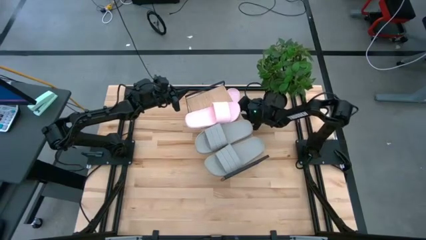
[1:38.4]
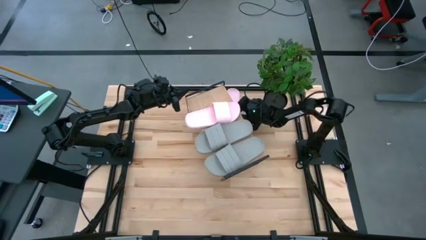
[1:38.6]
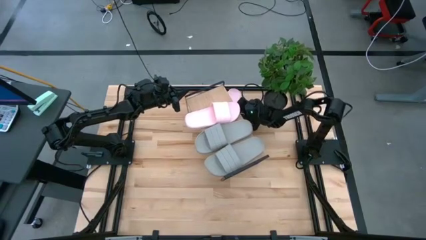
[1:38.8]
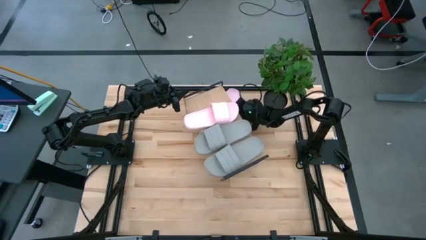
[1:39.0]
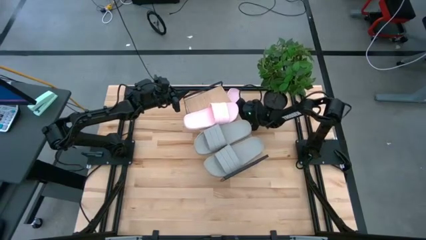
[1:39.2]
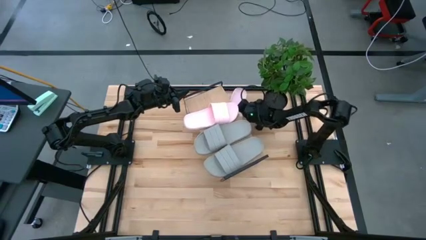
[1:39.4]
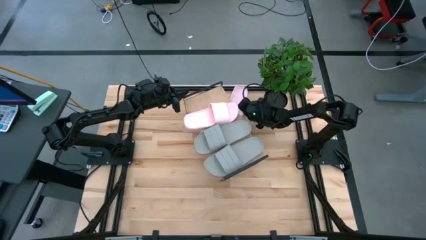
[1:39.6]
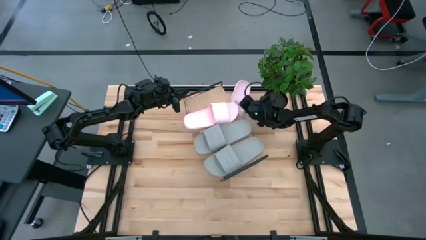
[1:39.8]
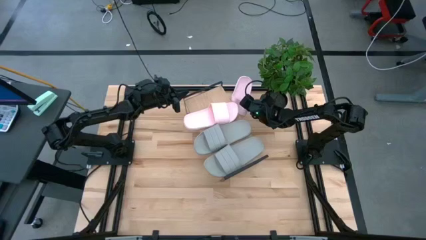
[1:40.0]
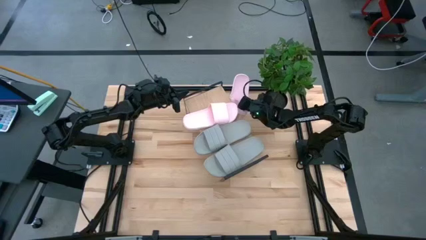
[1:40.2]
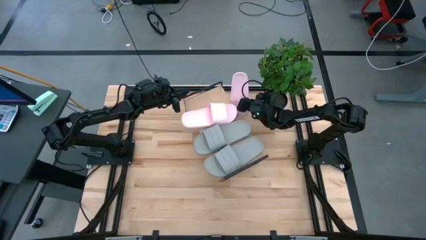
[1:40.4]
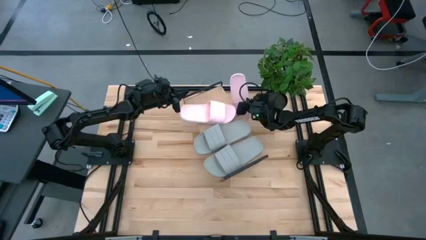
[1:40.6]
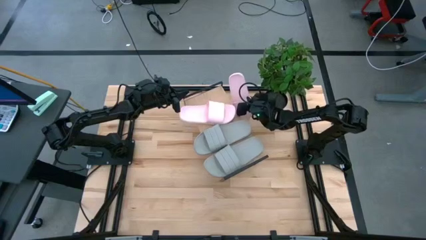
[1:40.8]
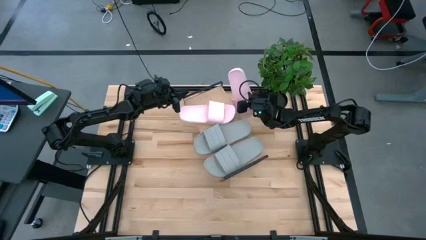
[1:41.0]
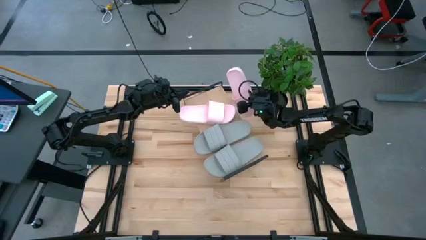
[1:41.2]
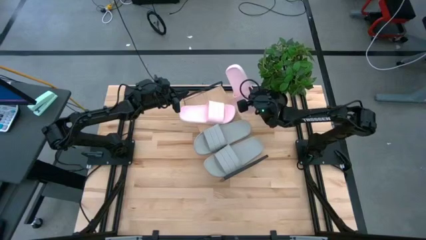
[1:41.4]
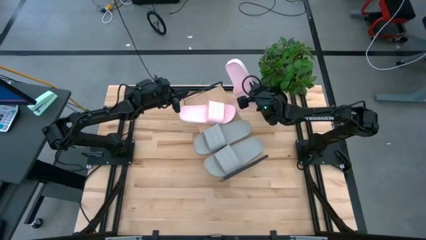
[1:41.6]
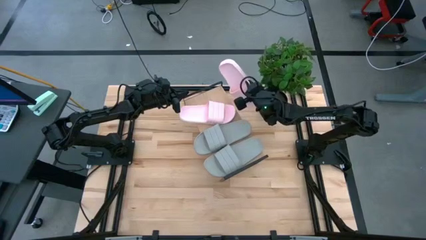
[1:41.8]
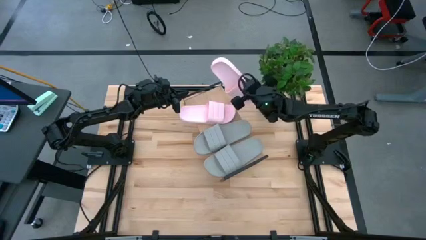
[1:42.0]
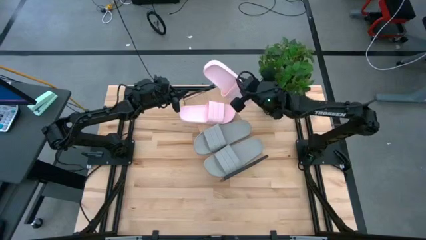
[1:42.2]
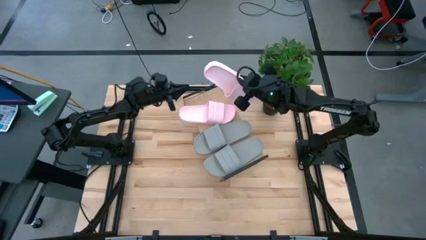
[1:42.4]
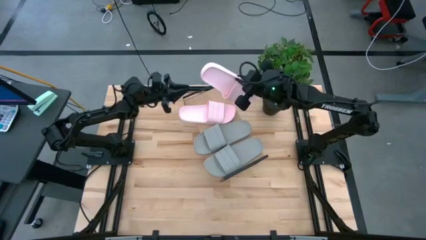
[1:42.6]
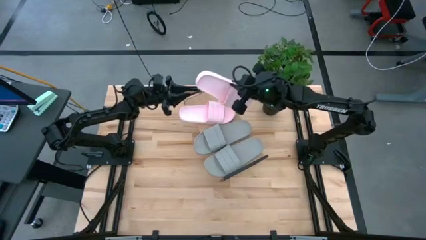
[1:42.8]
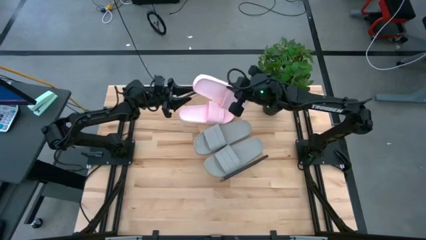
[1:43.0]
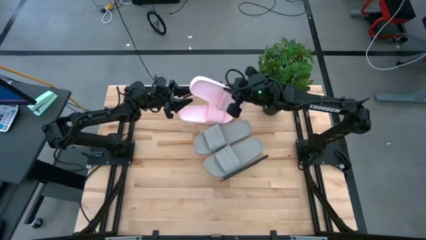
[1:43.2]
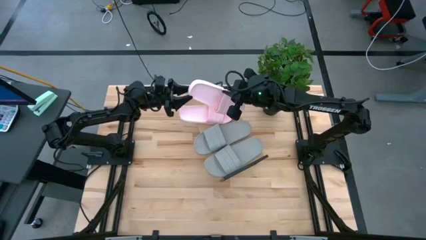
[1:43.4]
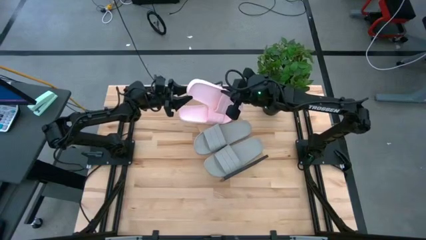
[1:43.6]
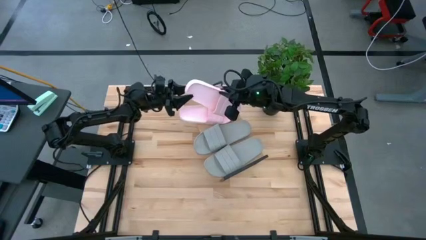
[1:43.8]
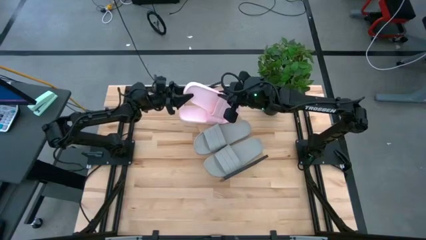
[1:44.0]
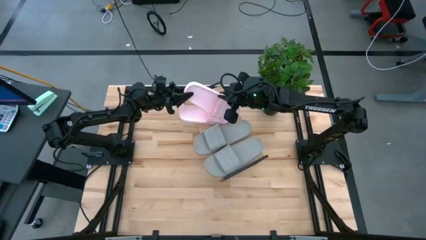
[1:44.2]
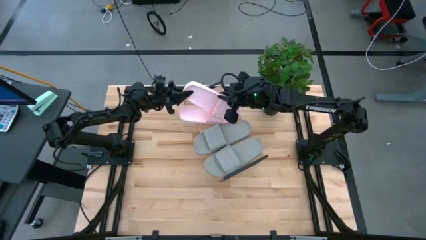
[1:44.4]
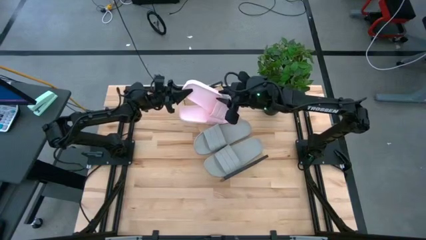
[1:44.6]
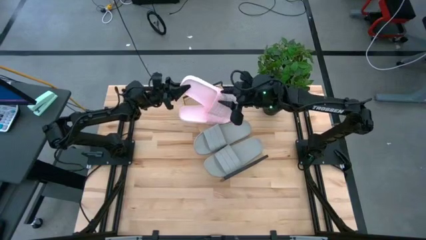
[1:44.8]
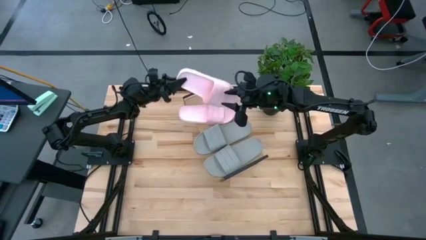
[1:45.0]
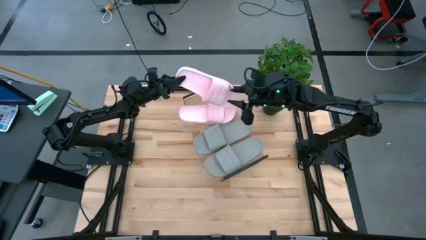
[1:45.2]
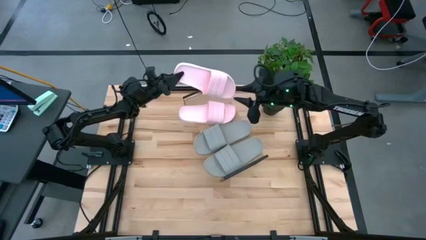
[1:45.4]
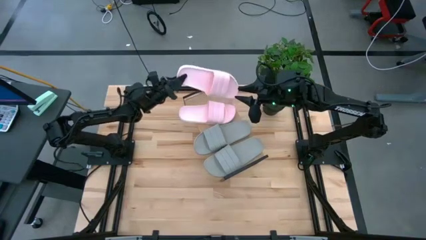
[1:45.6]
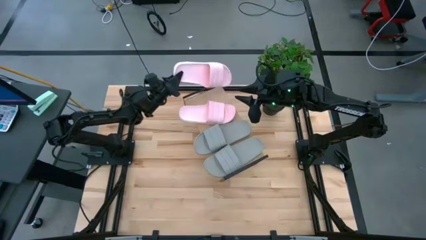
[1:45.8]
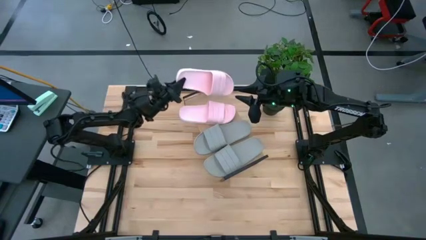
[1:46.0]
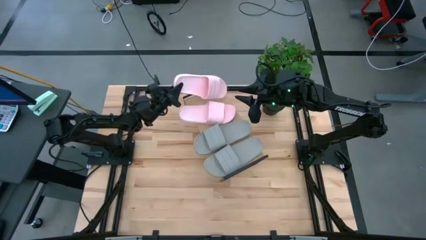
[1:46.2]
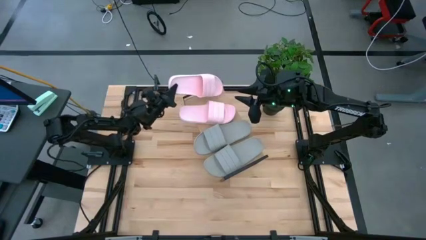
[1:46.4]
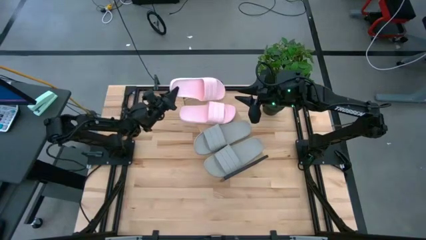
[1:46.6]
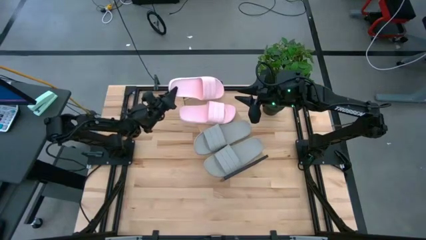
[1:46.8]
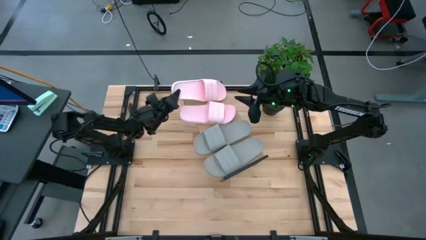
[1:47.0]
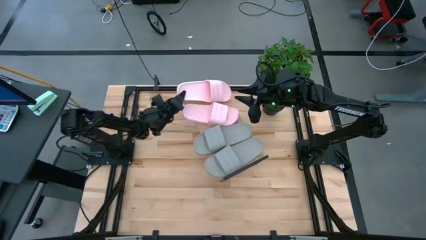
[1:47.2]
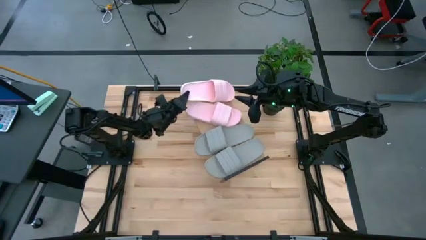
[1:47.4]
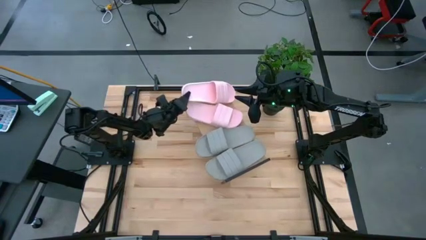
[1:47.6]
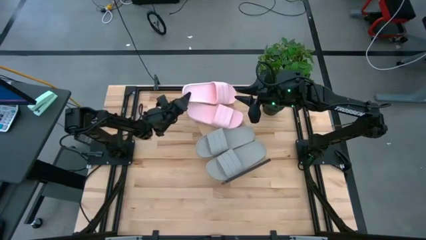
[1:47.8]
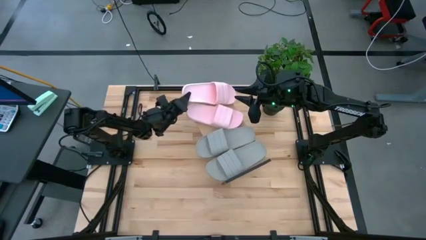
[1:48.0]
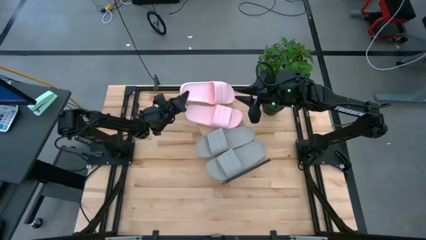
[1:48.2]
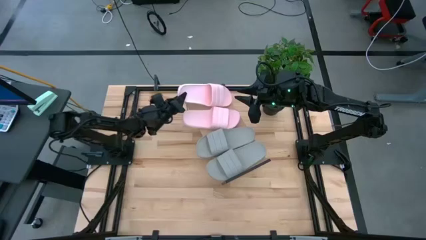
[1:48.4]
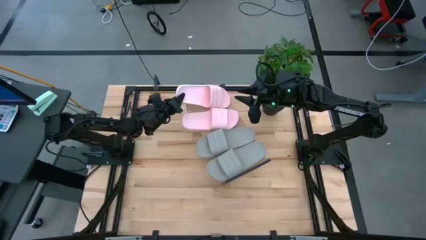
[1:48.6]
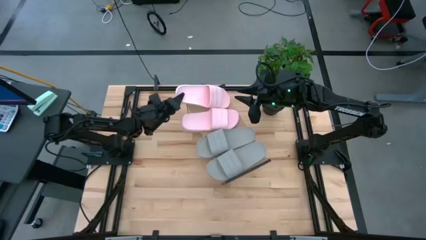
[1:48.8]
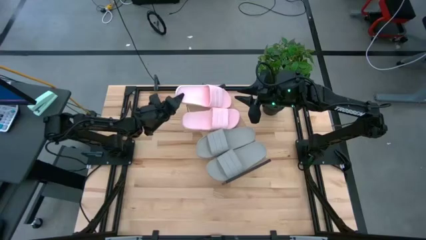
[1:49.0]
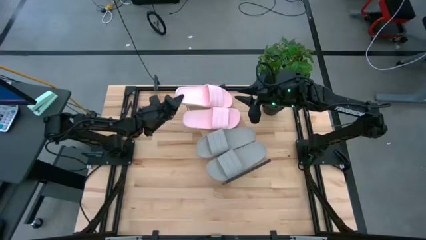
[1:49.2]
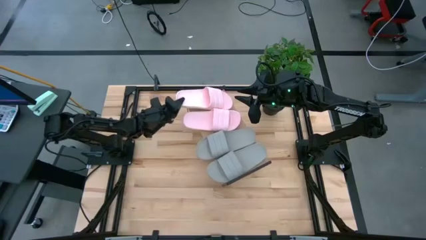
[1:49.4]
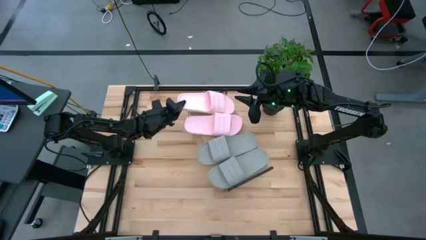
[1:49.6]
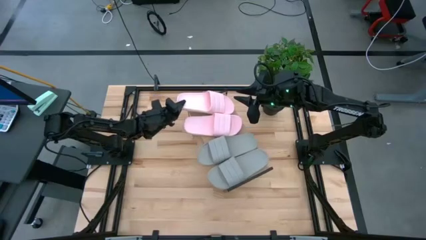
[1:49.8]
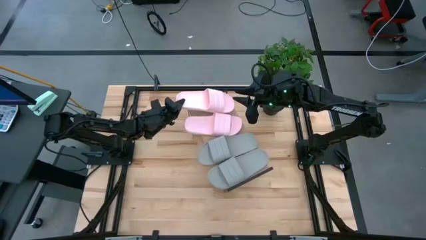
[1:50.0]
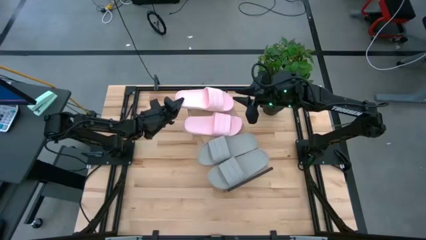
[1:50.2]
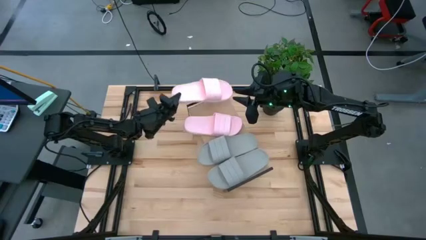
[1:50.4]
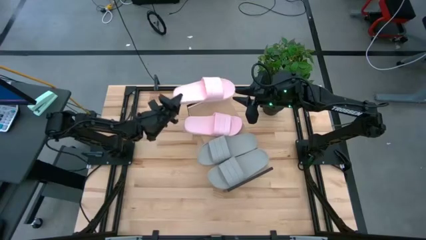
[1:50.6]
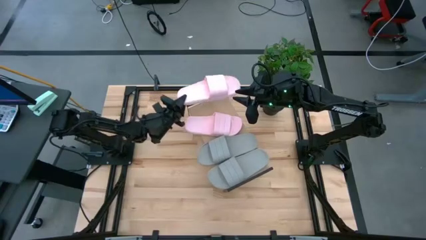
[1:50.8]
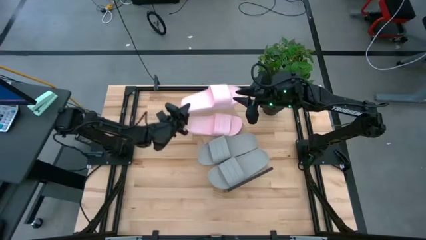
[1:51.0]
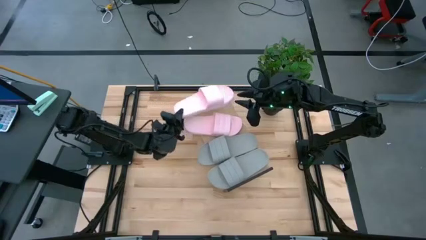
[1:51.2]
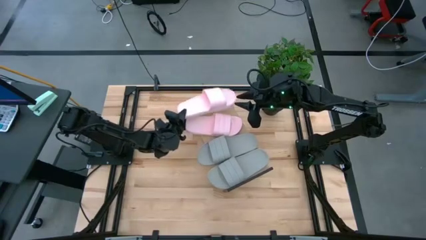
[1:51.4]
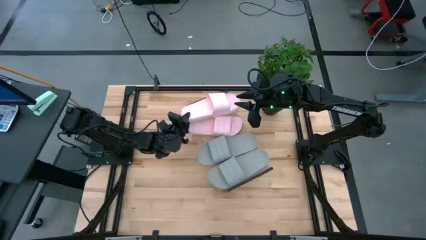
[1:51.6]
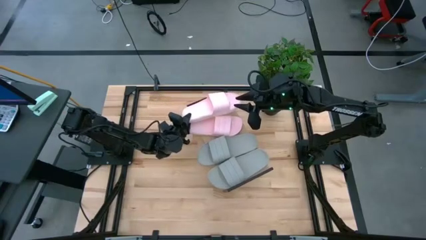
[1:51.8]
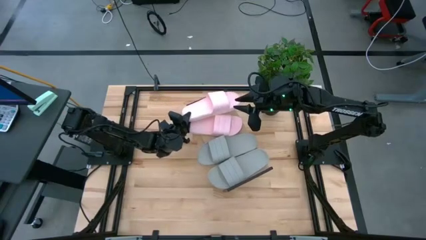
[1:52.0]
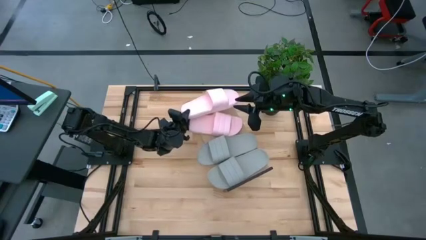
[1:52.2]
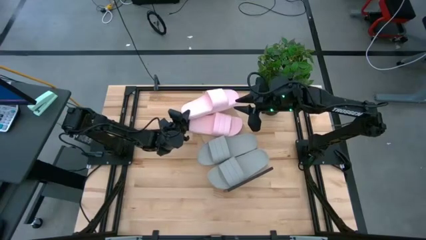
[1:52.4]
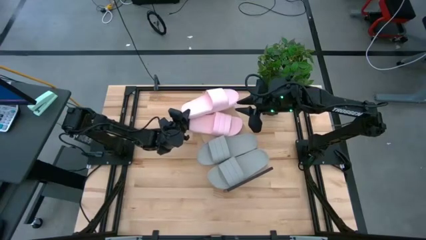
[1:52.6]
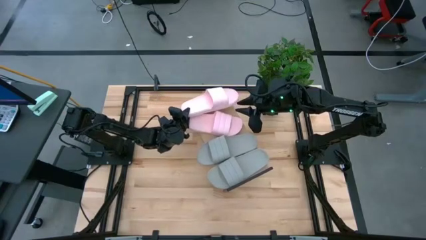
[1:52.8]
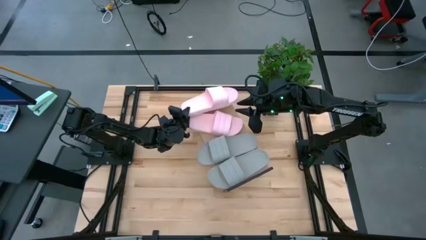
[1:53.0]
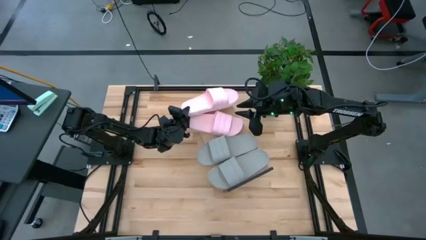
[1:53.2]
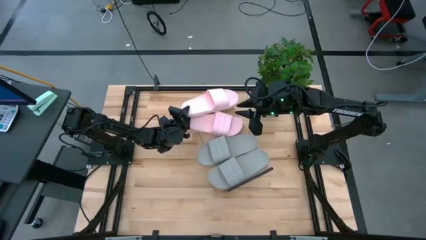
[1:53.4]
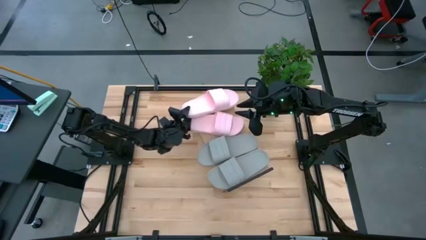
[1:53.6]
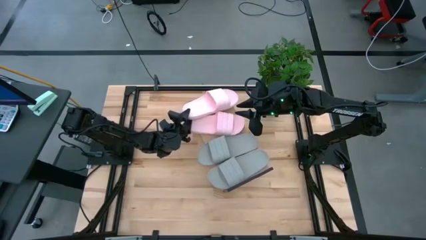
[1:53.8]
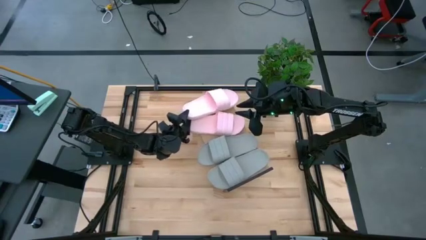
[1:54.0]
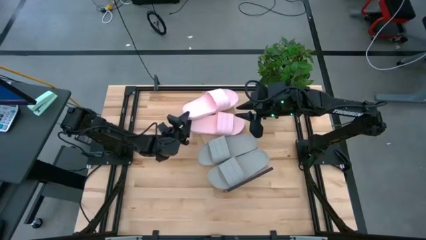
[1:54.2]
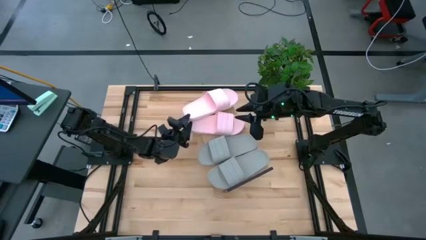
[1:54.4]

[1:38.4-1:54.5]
Task: Pick and place slides into the shelf
Put the pink slipper on the shelf

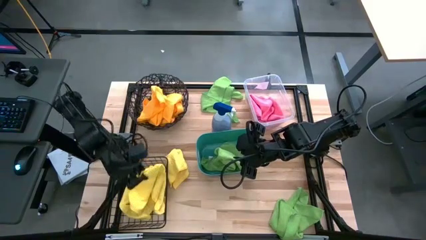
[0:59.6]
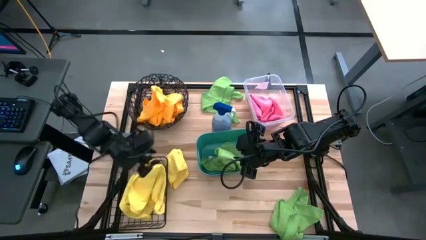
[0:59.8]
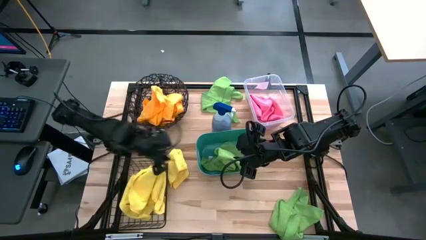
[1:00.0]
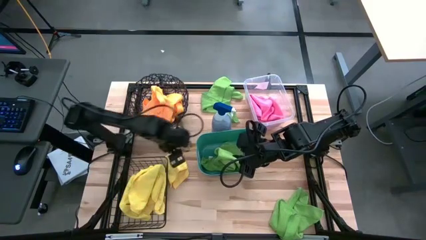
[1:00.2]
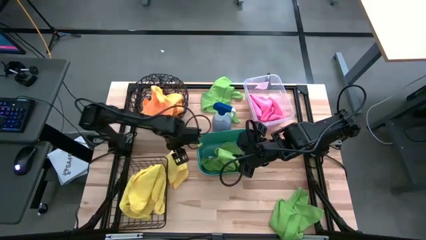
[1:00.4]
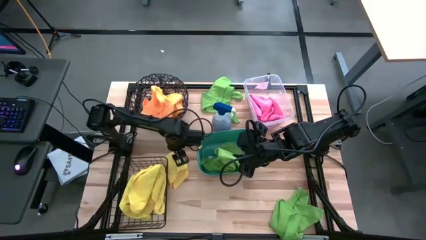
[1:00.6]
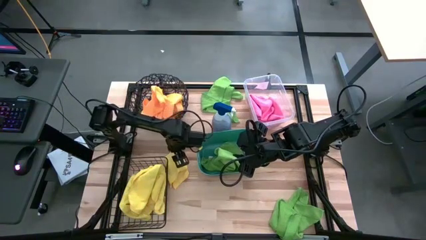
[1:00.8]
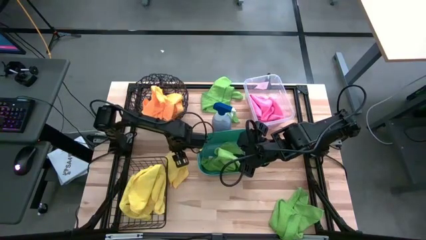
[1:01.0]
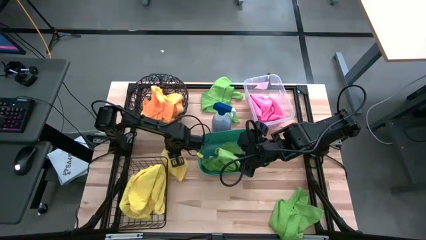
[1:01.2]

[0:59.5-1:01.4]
Task: Sort microfiber towel by color & place in baskets
Put the yellow towel into the wire basket
